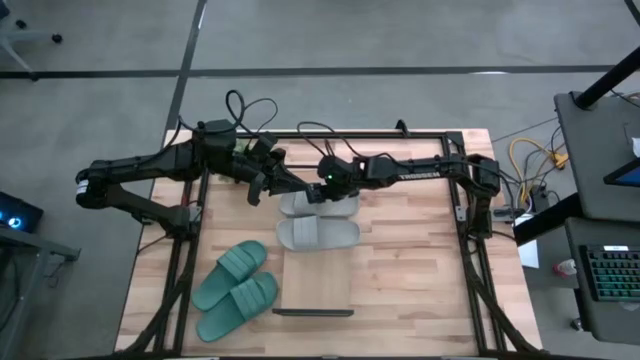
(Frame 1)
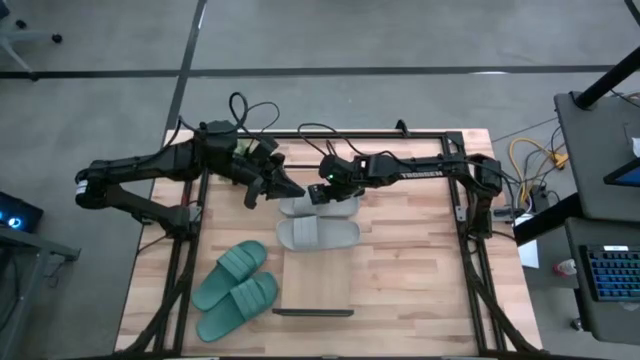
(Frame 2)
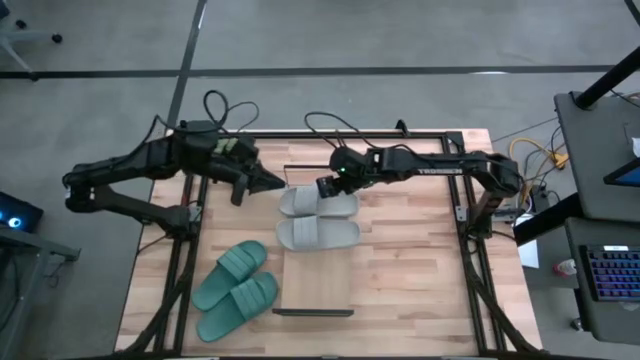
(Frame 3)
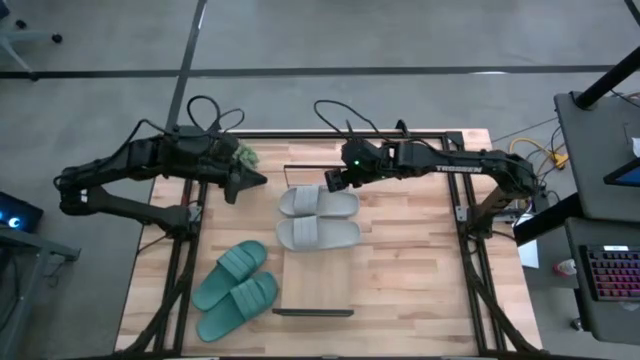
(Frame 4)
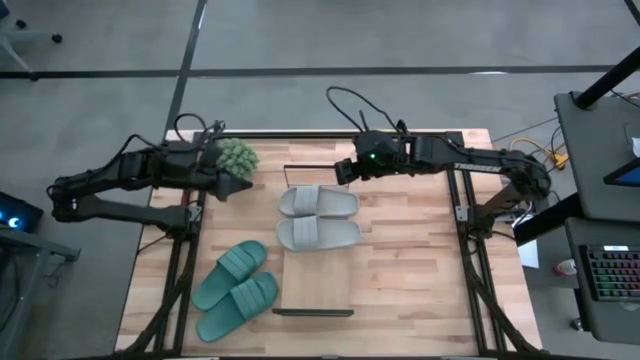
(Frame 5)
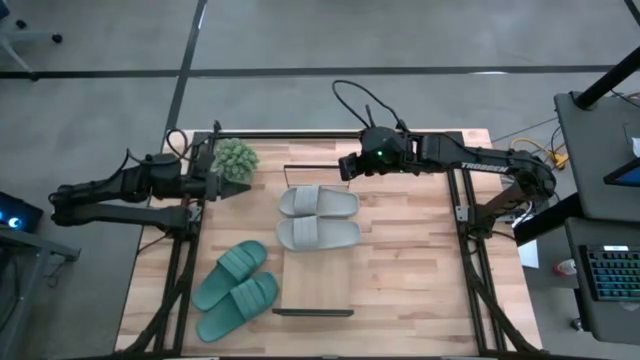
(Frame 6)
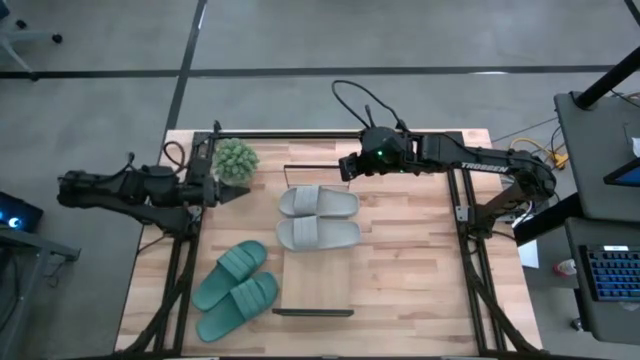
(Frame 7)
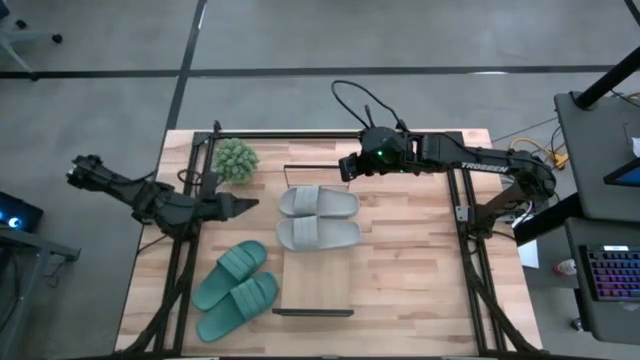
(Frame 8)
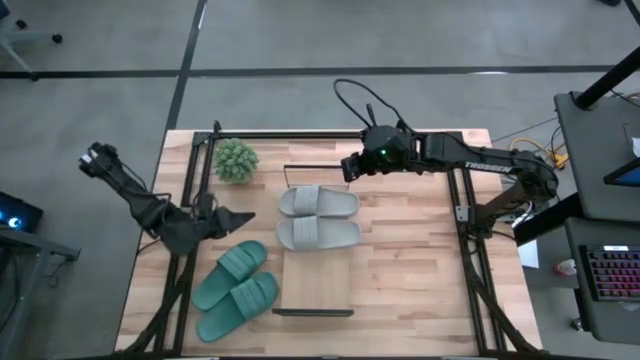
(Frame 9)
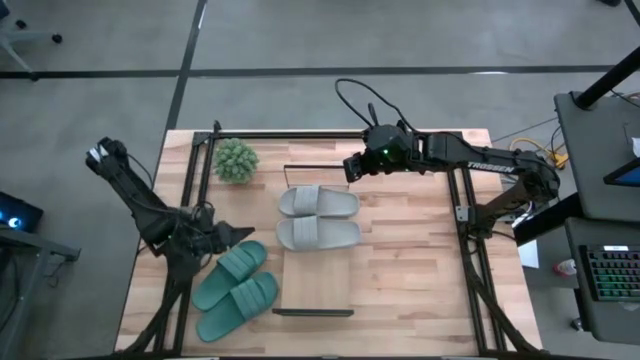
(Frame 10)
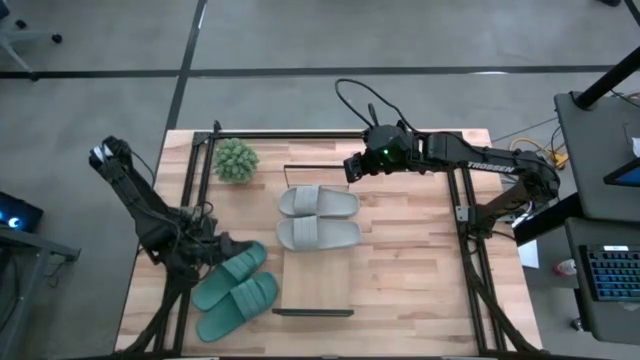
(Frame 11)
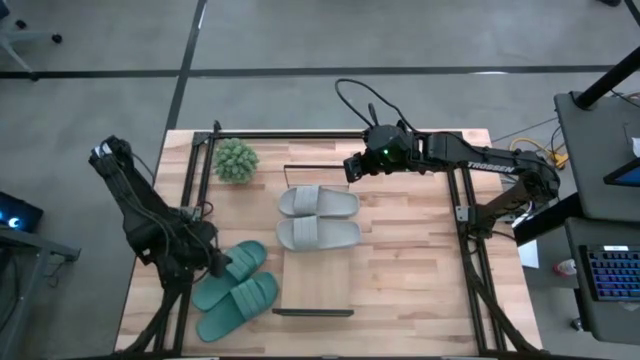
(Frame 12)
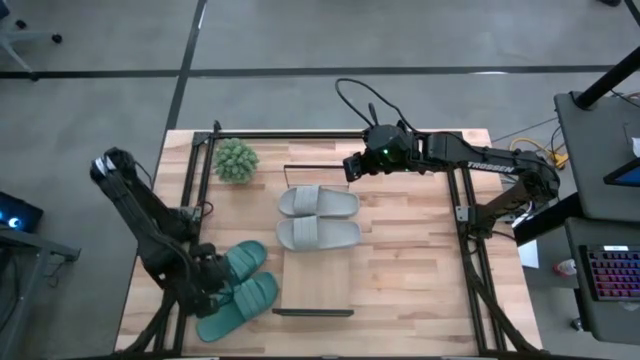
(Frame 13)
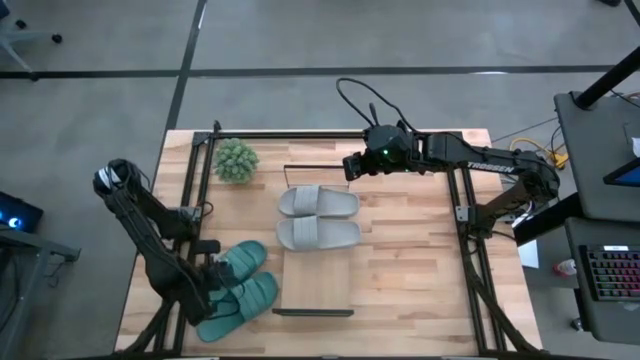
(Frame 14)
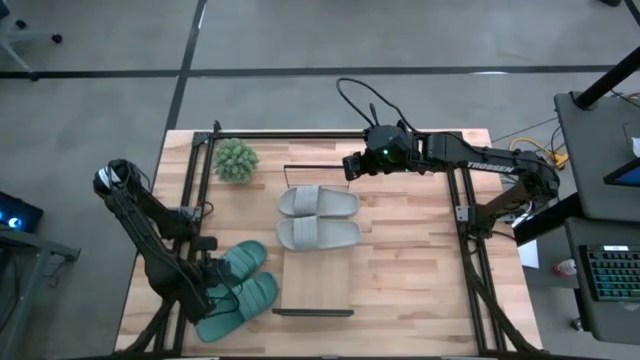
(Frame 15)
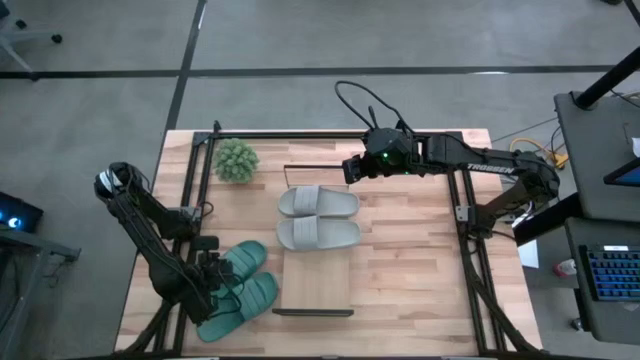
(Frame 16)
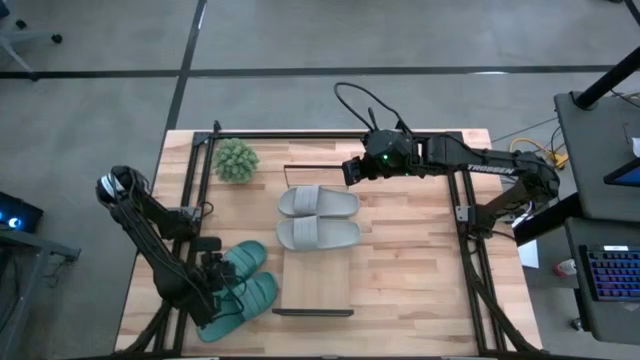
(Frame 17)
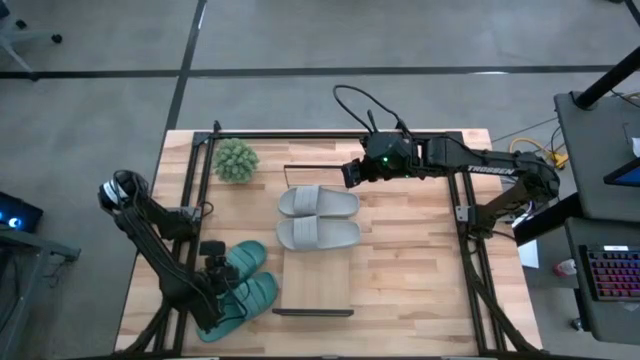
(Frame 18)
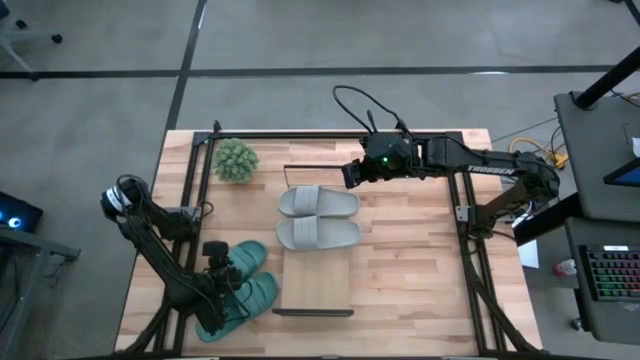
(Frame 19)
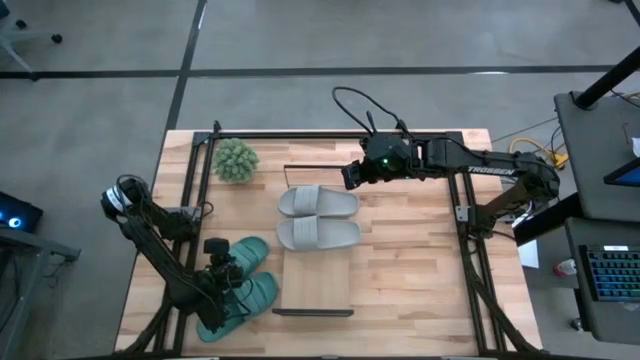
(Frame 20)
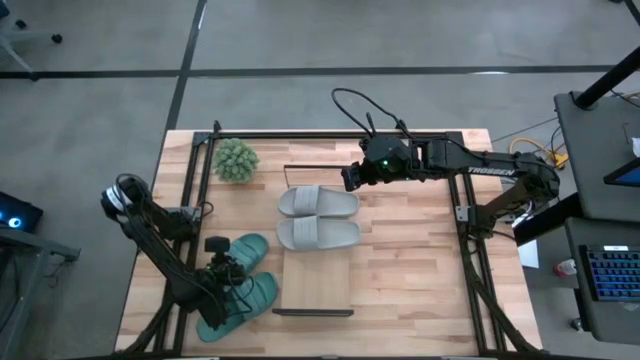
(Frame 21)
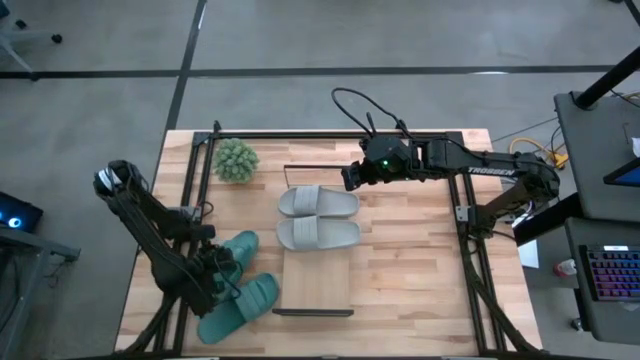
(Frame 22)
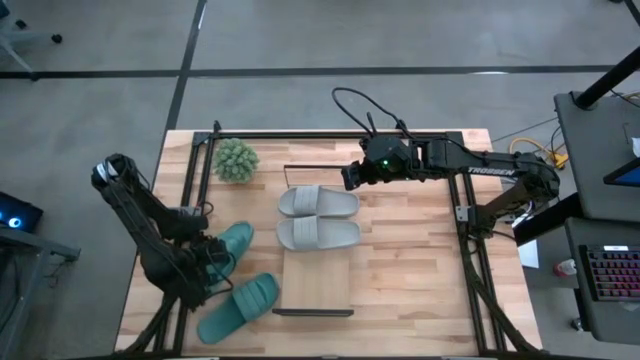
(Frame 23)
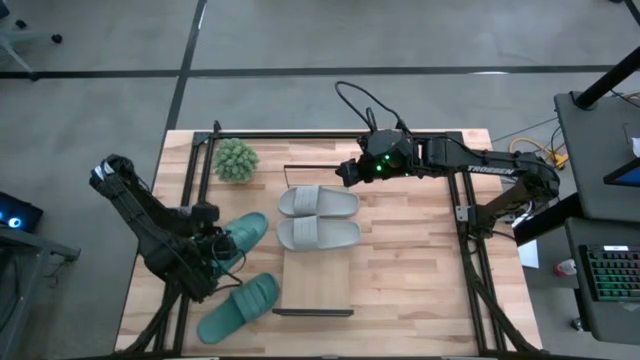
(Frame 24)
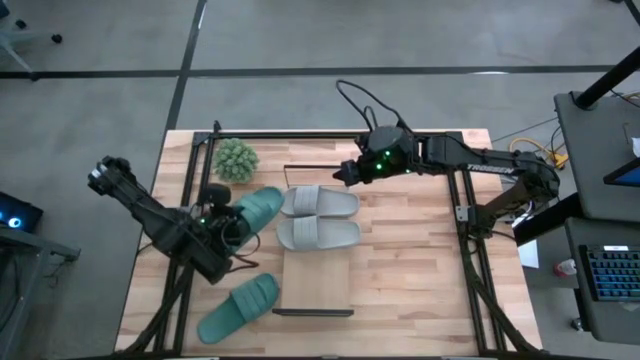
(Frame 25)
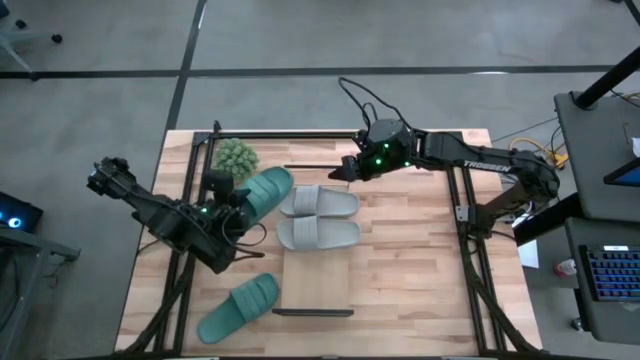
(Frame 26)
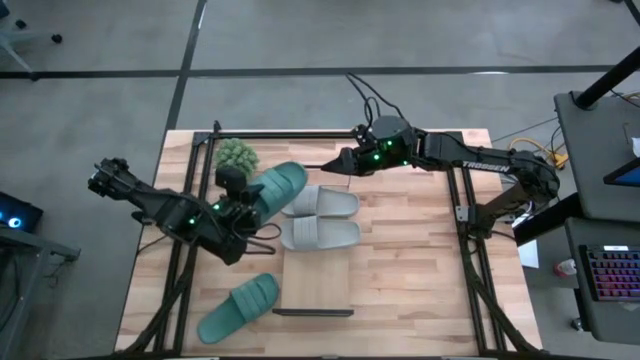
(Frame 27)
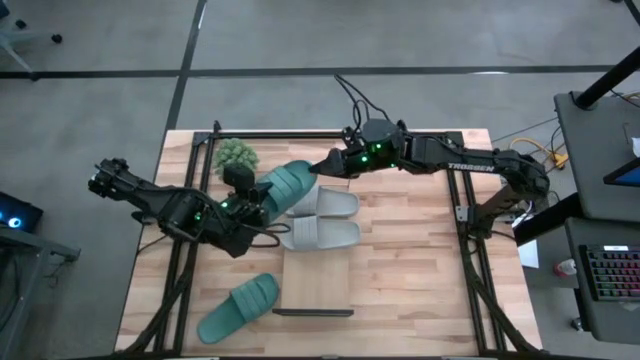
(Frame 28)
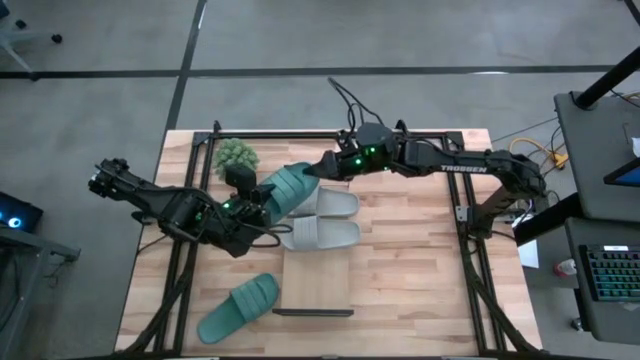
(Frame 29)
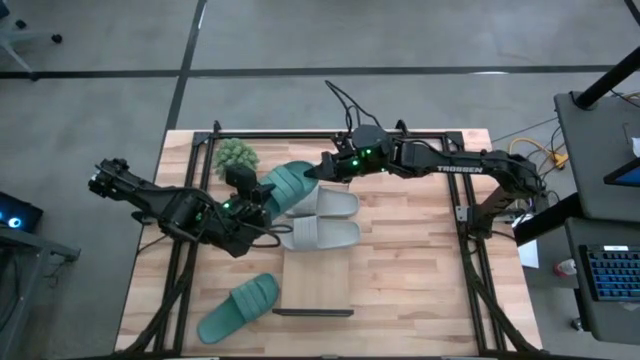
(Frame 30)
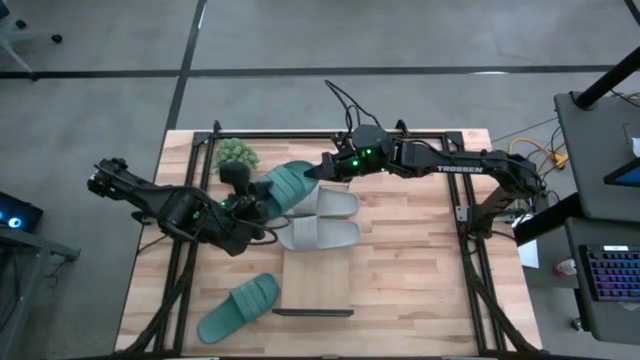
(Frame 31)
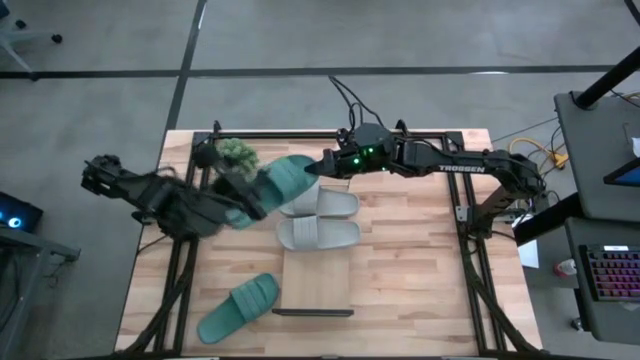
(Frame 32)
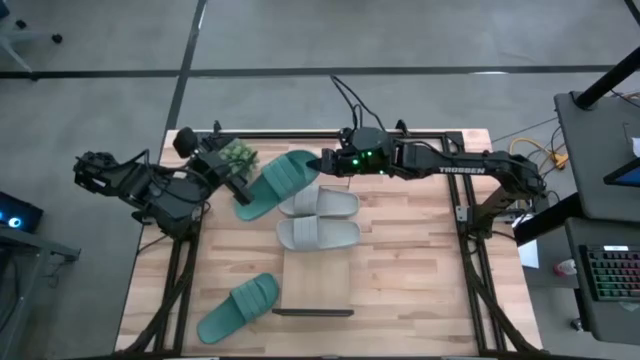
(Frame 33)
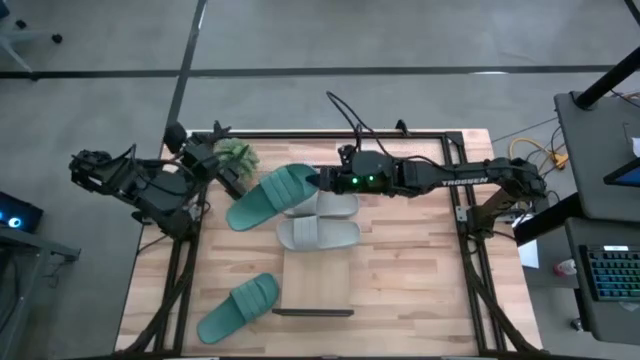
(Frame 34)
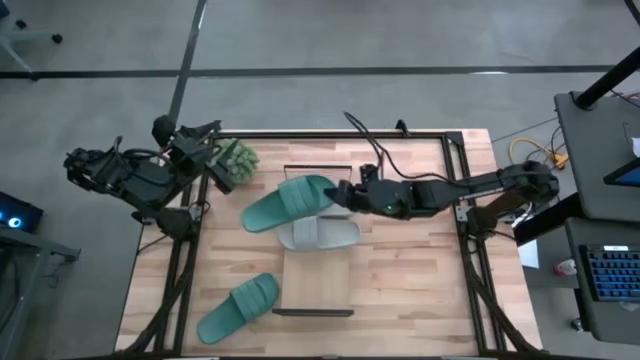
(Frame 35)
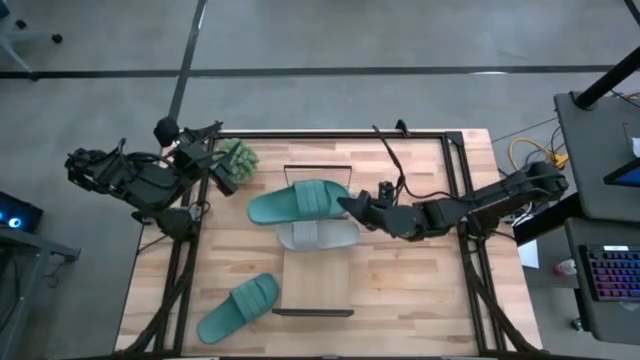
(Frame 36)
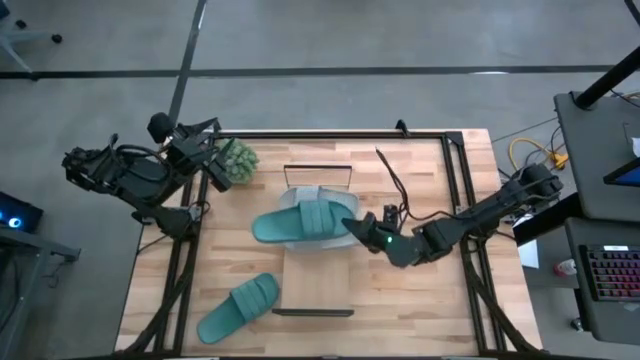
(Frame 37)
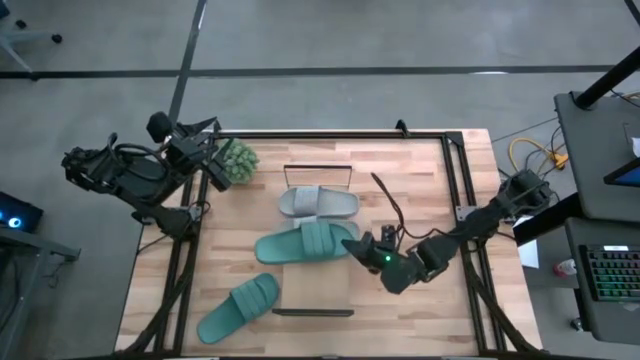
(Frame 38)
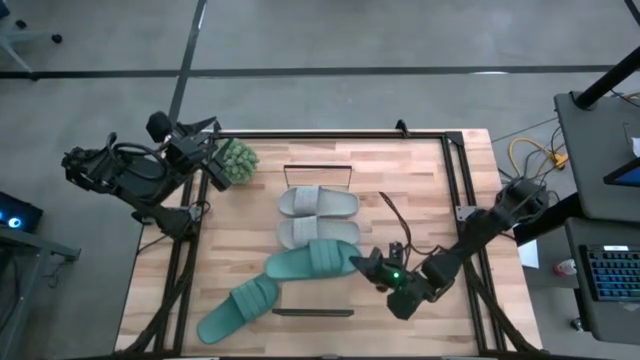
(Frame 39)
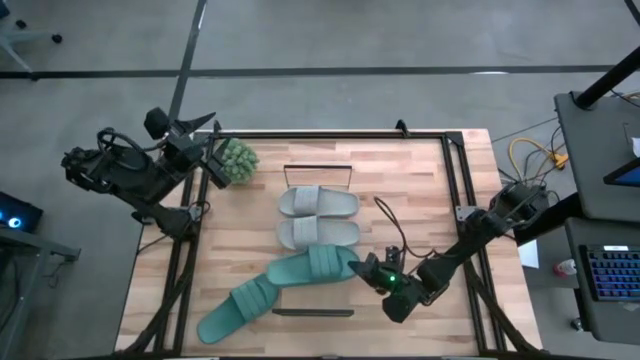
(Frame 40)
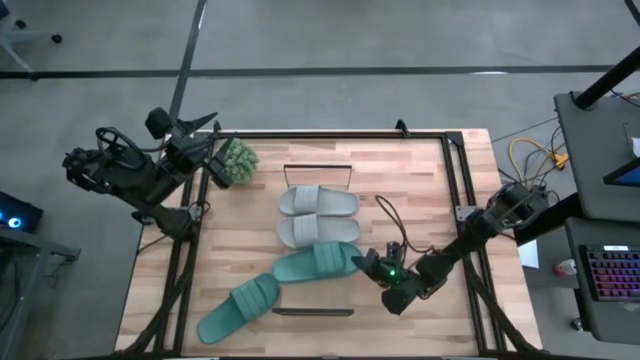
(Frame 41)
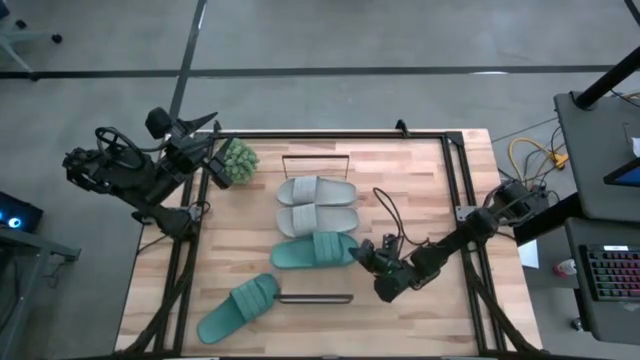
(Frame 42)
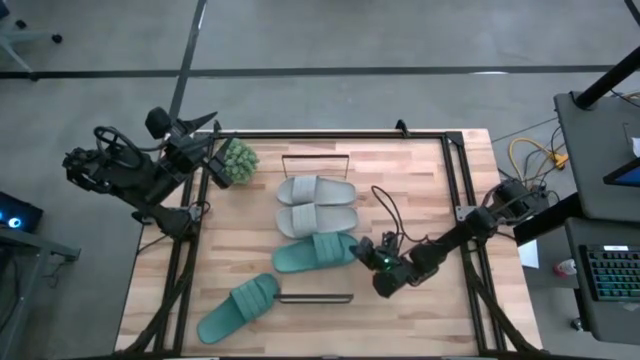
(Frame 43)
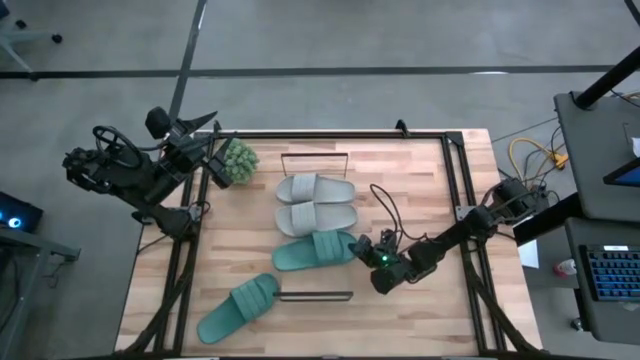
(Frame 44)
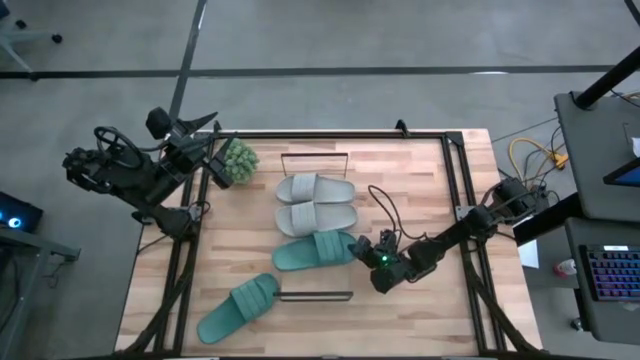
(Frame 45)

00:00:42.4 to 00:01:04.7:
Task: Pick and place slides into the shelf
Put the green slipper on the shelf
